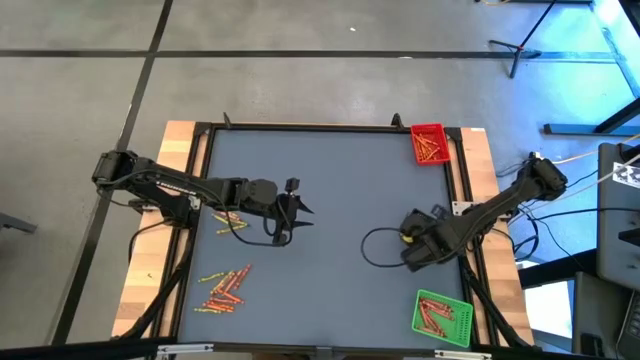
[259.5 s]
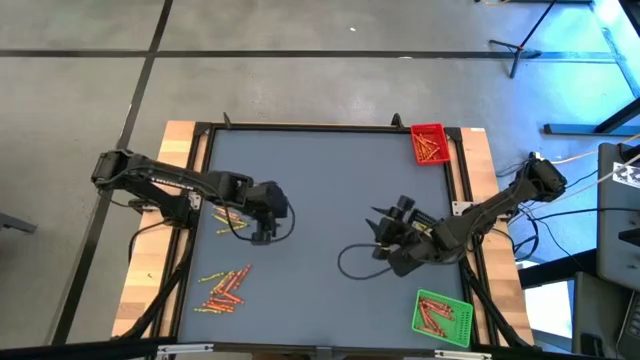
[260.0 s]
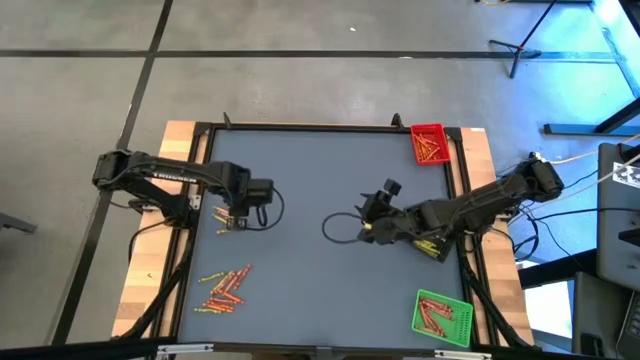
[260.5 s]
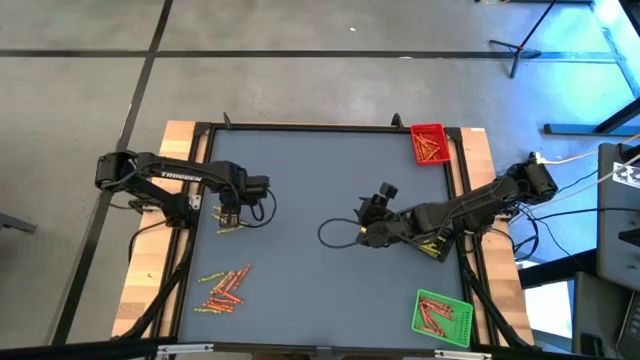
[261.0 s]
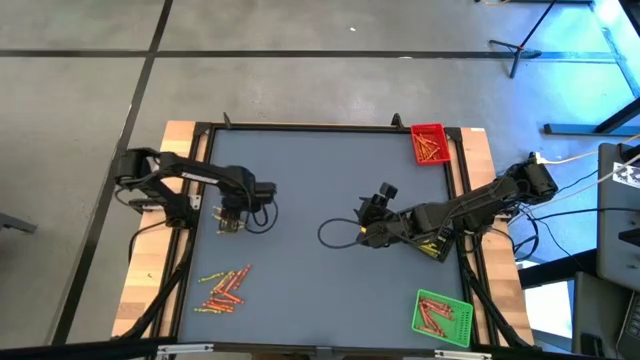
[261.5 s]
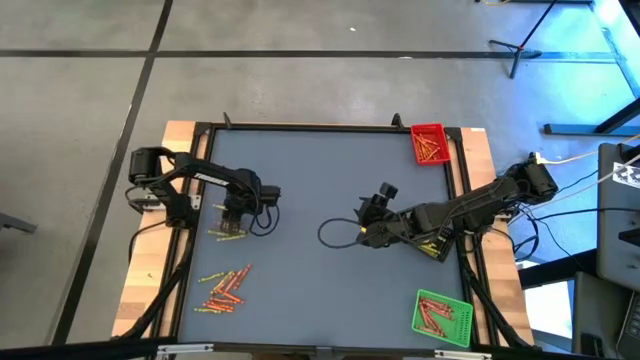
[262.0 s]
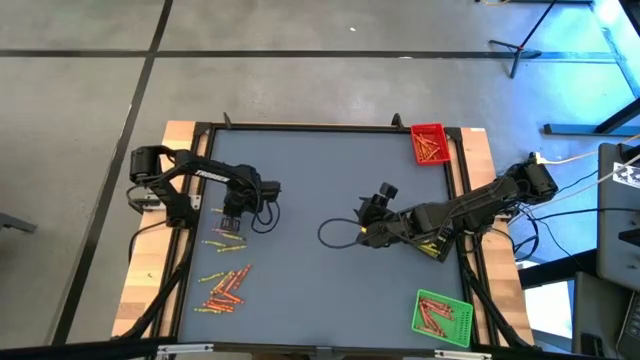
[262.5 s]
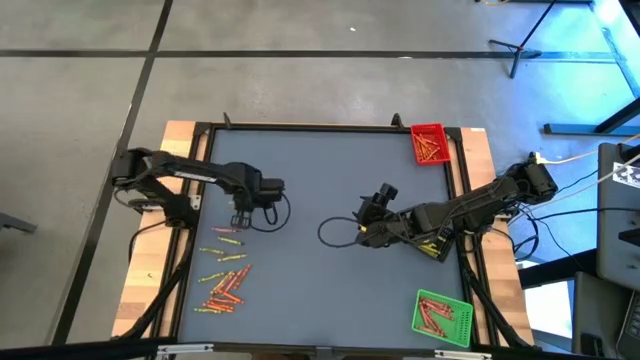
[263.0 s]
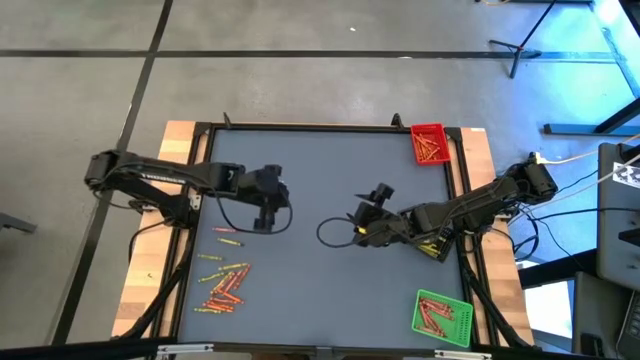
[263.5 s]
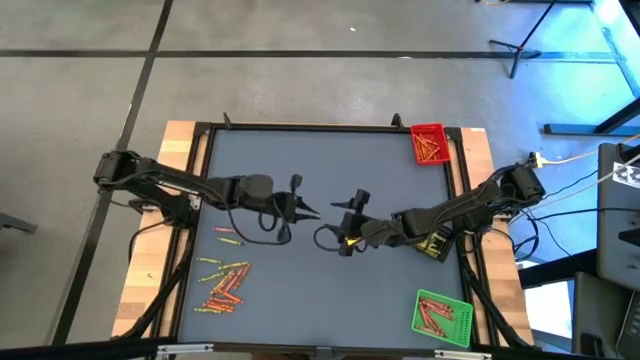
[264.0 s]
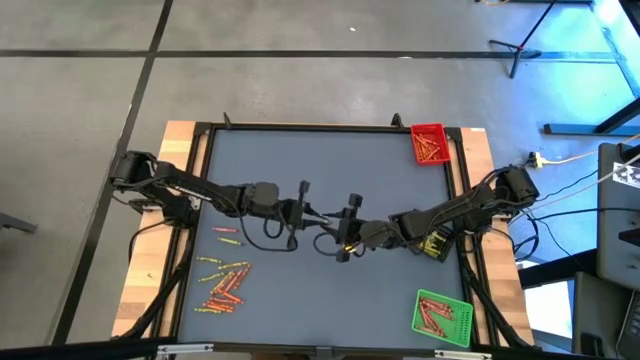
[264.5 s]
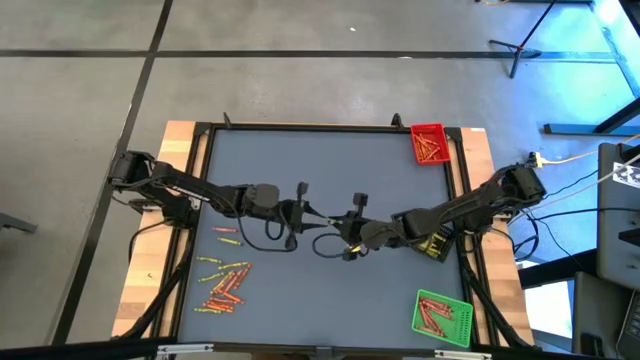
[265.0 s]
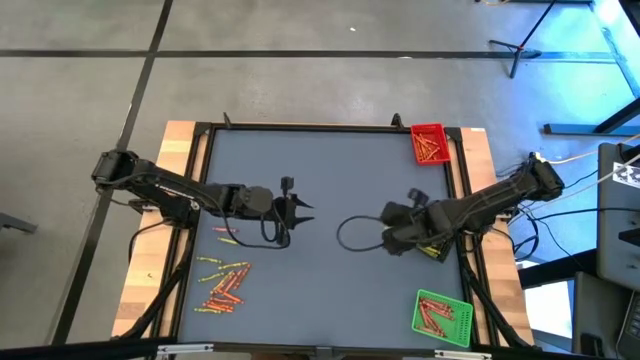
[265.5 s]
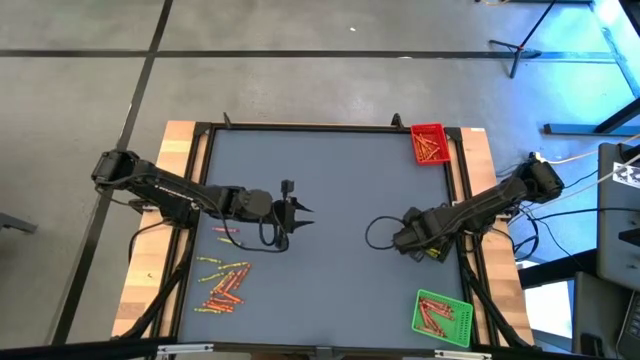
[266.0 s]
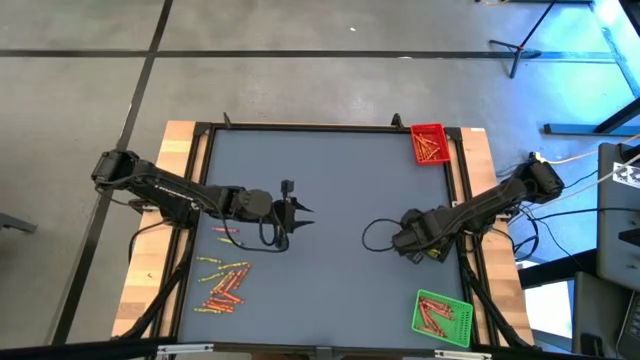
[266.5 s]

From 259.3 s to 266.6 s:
Task: Sort crayons
Put the yellow green crayon into the black basket

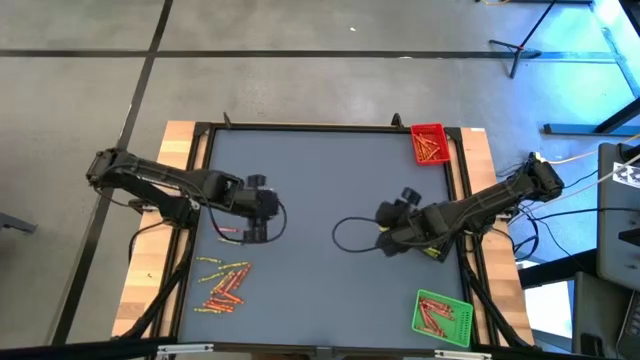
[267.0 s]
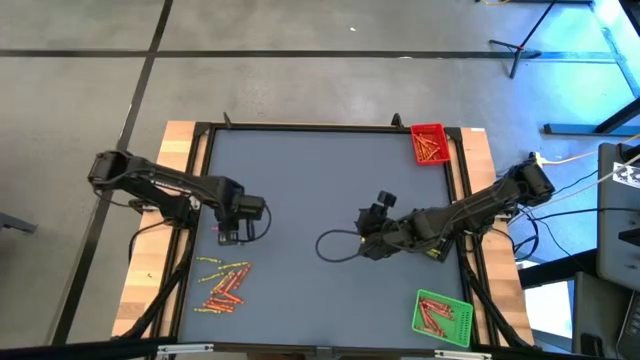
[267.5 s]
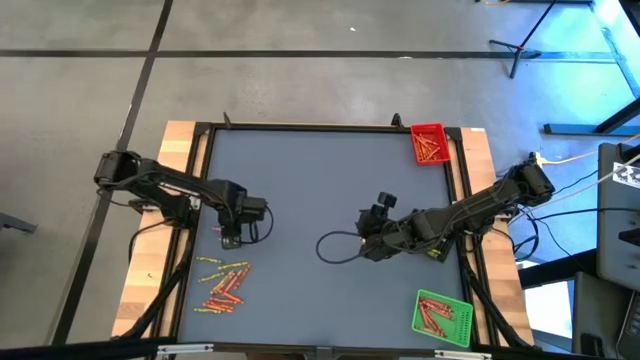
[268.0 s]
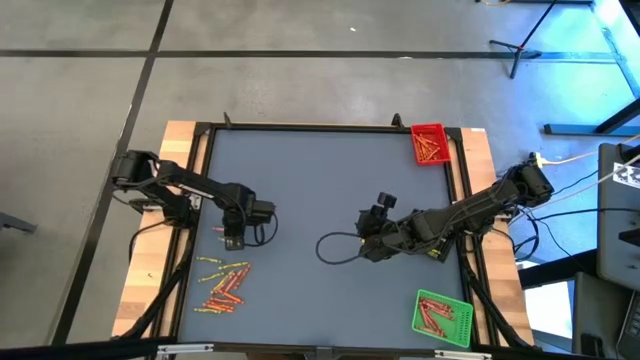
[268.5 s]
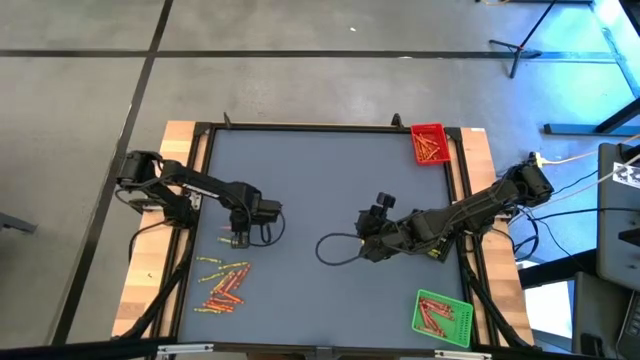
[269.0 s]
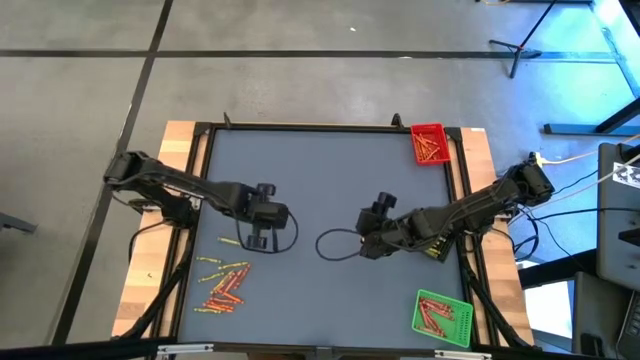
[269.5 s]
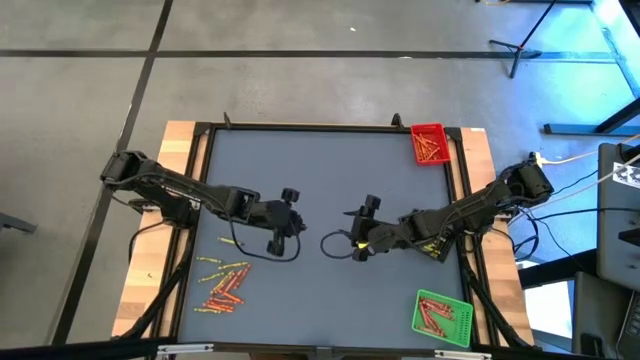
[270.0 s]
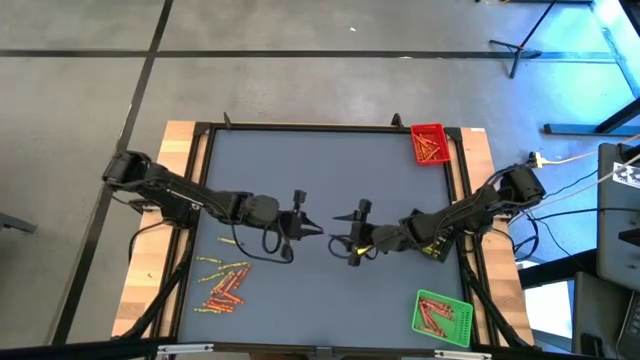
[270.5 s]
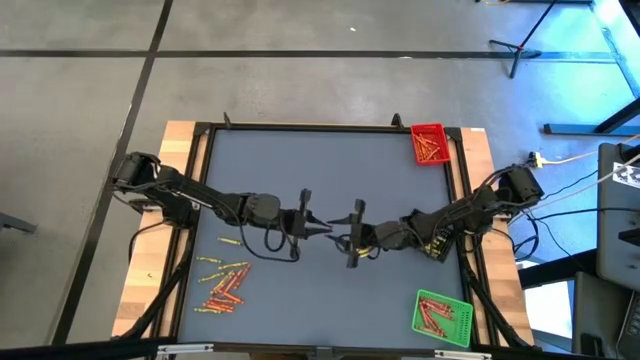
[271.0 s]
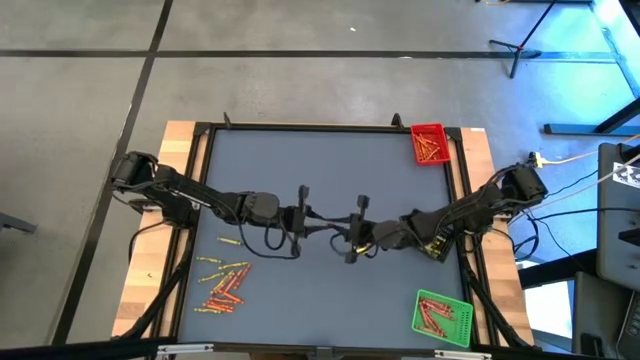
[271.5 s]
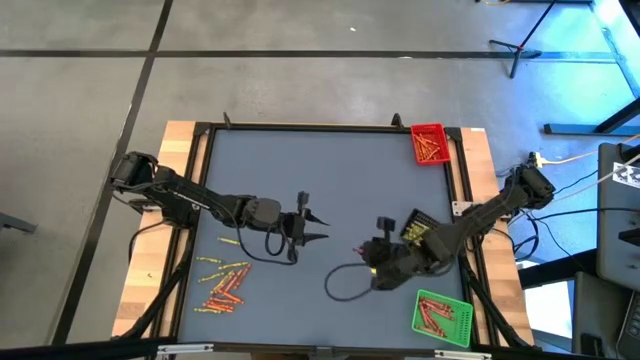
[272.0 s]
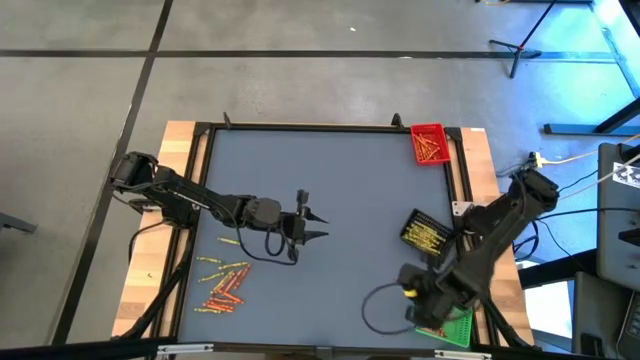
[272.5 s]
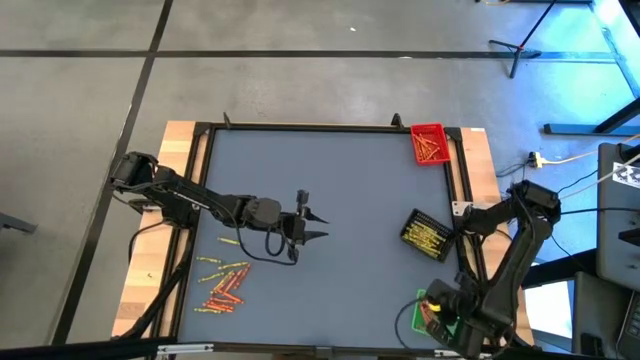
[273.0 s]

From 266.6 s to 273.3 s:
Put the red crayon into the green basket

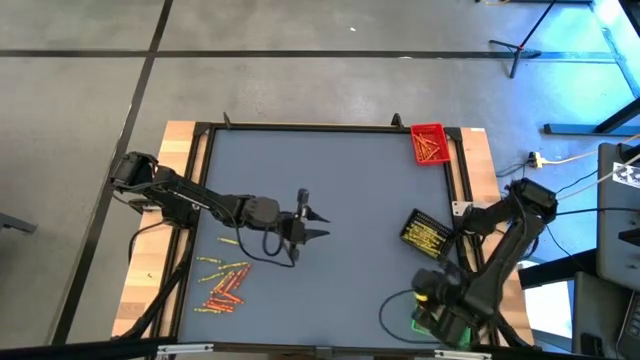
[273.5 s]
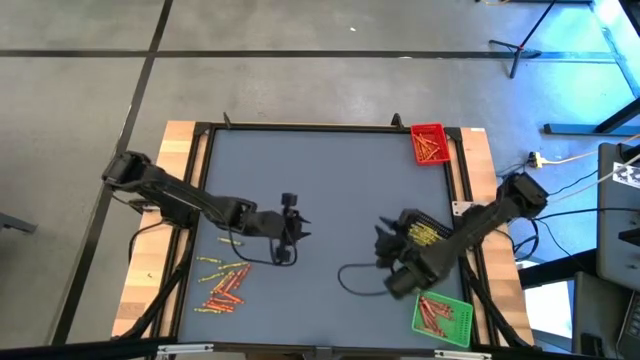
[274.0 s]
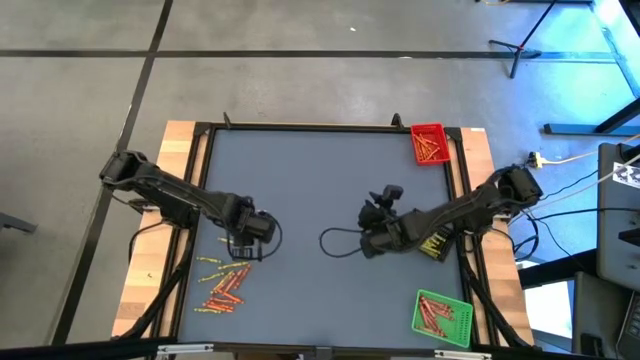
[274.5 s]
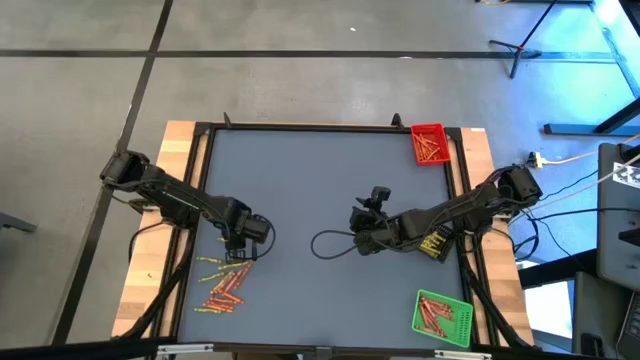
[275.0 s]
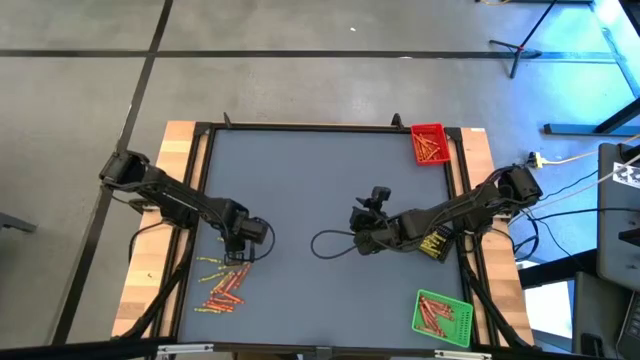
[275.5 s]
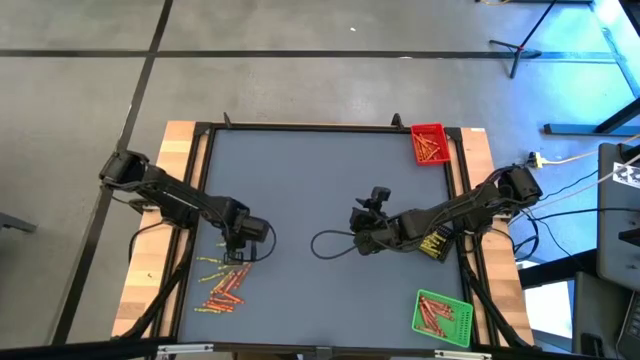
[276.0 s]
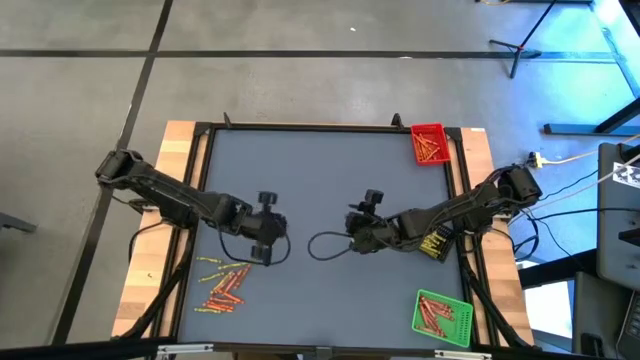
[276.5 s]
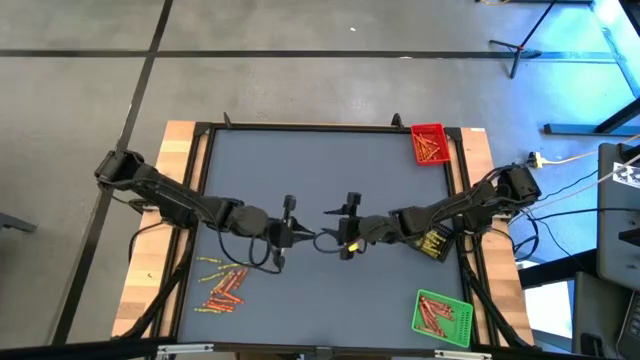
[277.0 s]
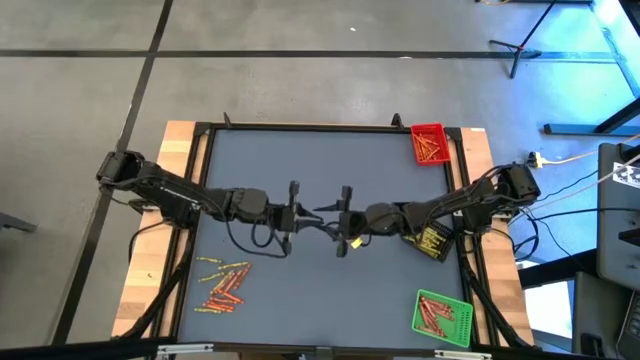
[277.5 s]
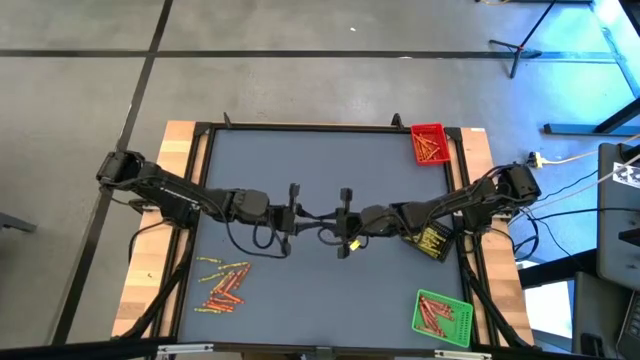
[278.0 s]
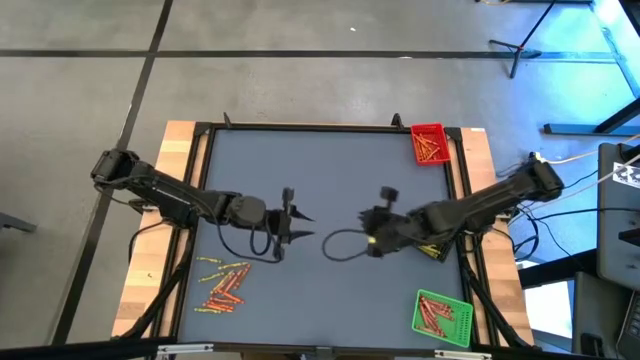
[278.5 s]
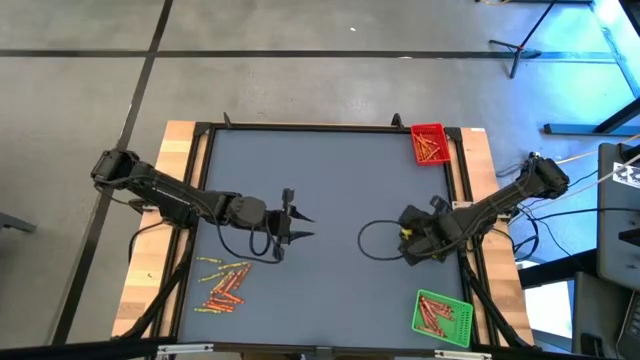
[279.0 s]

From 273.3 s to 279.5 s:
Put the green crayon into the black basket
